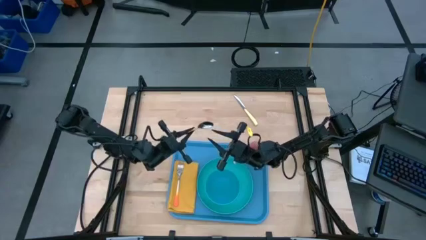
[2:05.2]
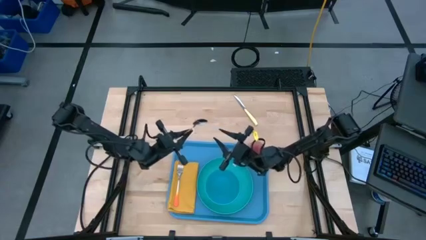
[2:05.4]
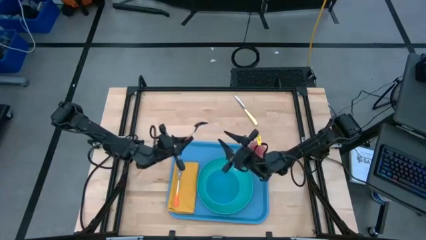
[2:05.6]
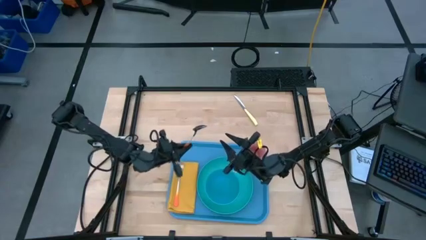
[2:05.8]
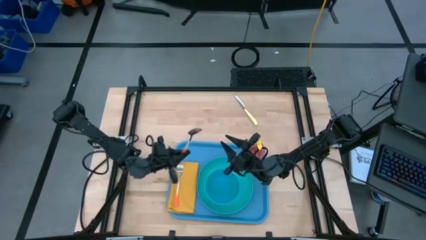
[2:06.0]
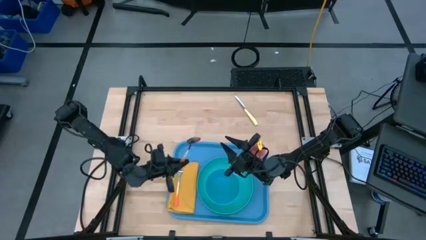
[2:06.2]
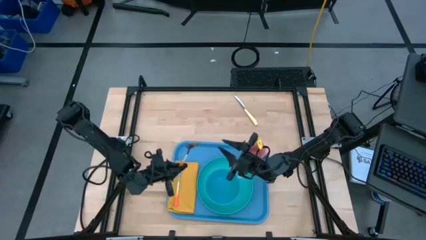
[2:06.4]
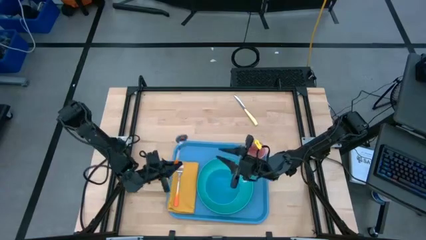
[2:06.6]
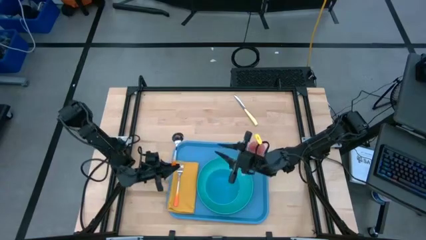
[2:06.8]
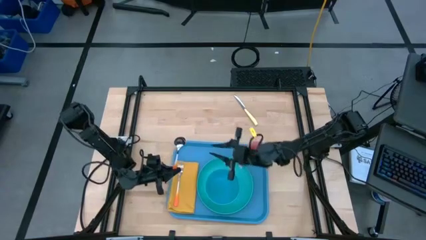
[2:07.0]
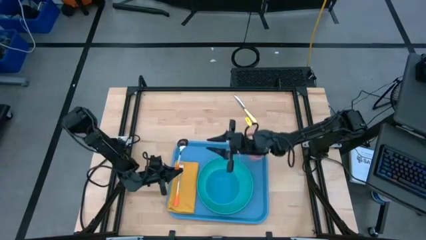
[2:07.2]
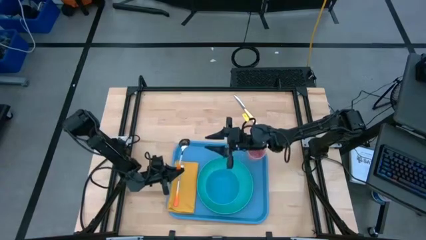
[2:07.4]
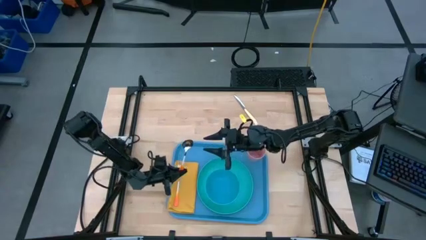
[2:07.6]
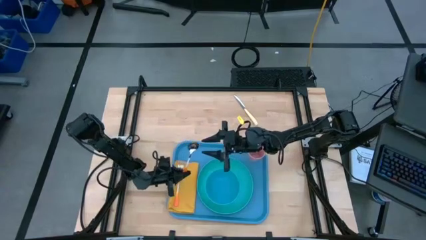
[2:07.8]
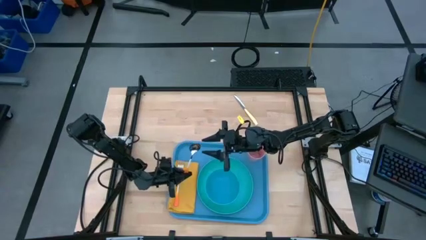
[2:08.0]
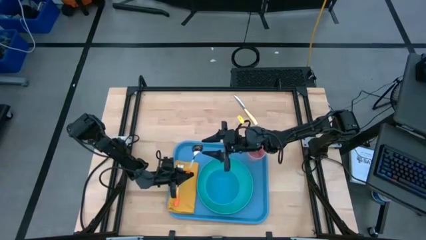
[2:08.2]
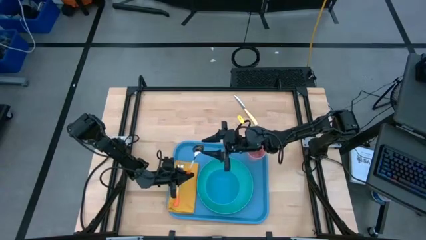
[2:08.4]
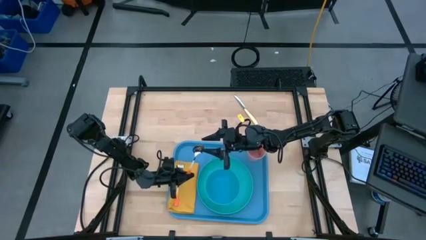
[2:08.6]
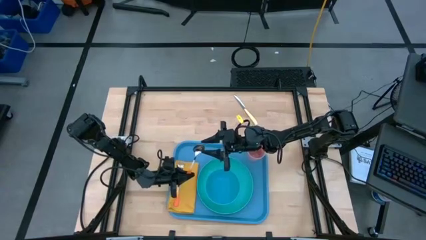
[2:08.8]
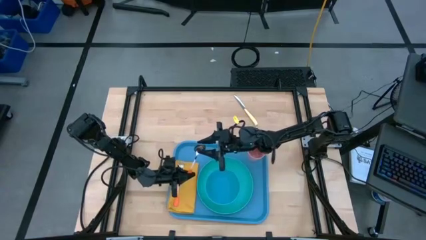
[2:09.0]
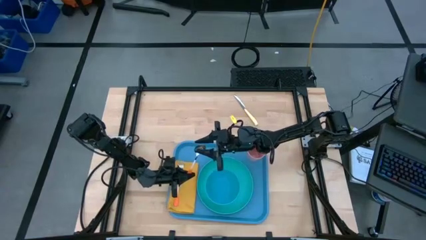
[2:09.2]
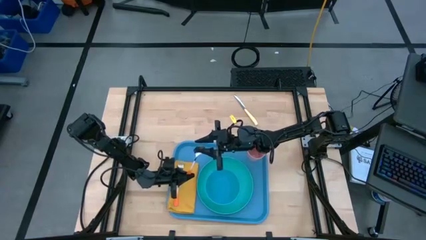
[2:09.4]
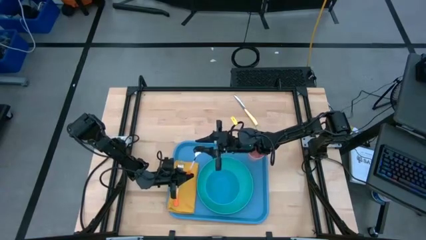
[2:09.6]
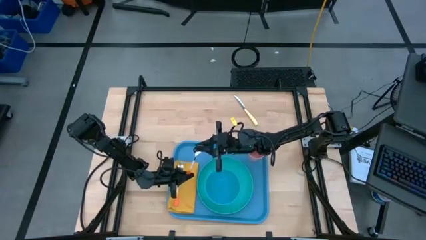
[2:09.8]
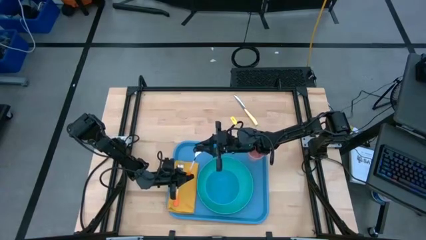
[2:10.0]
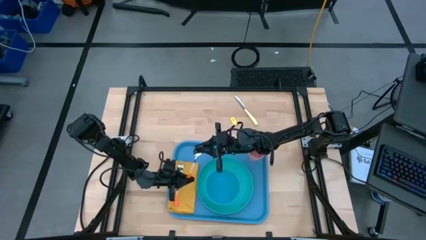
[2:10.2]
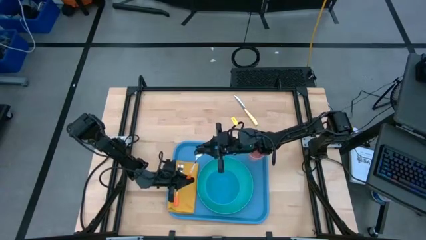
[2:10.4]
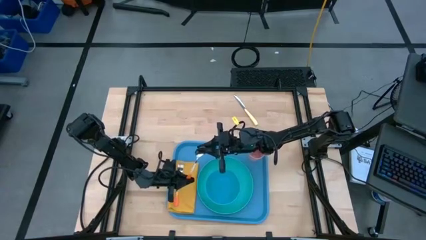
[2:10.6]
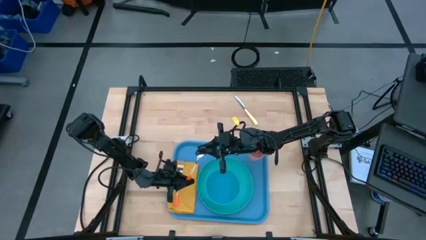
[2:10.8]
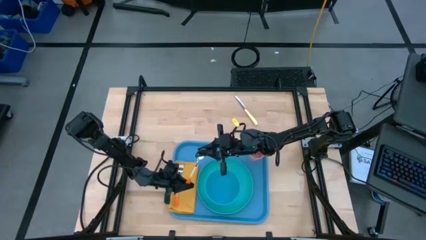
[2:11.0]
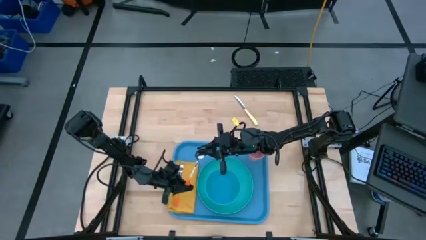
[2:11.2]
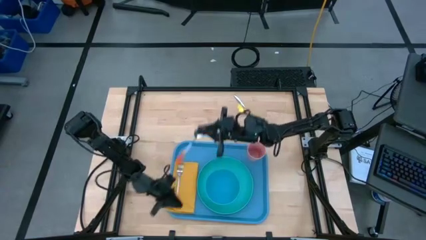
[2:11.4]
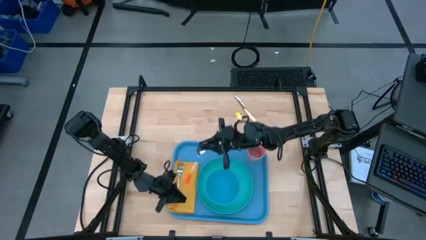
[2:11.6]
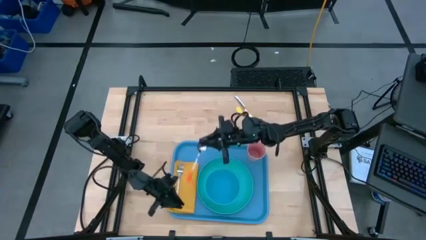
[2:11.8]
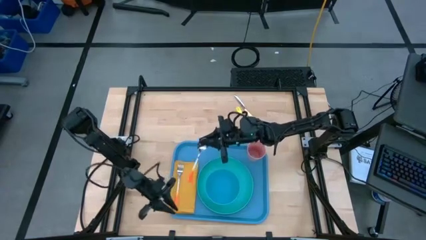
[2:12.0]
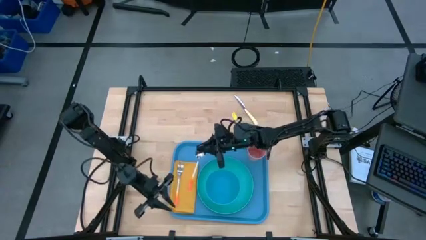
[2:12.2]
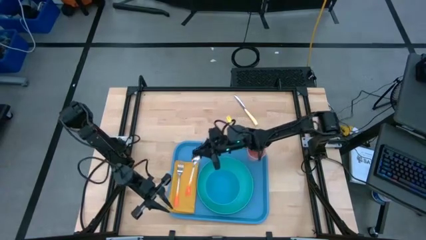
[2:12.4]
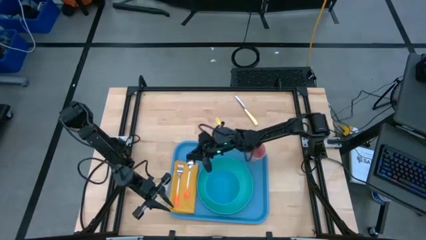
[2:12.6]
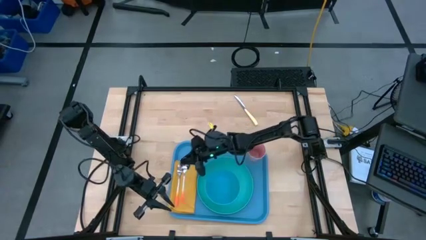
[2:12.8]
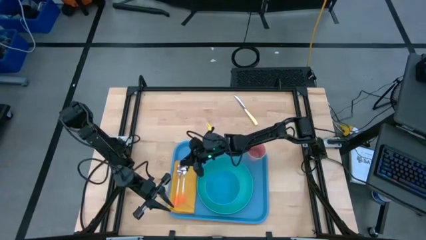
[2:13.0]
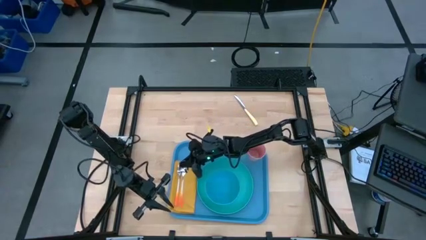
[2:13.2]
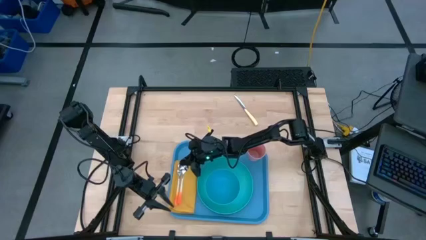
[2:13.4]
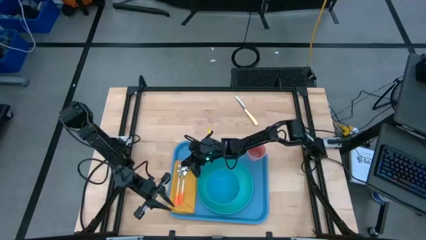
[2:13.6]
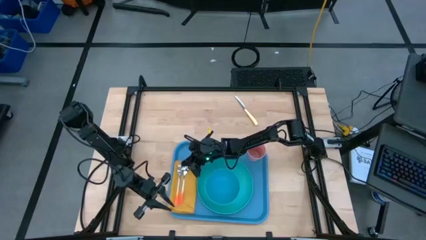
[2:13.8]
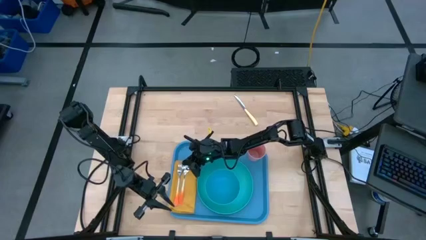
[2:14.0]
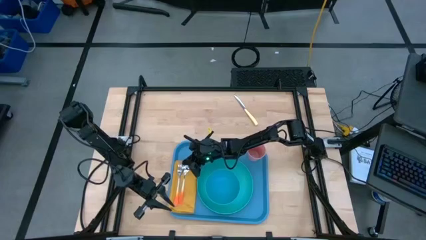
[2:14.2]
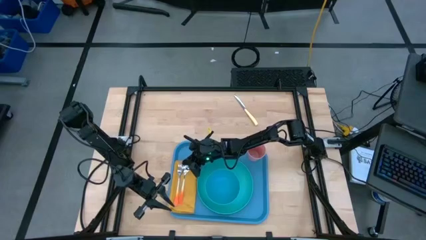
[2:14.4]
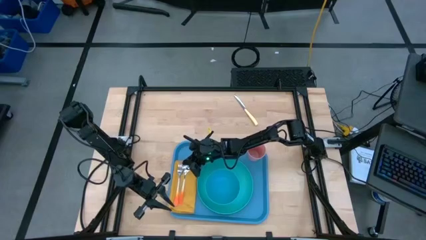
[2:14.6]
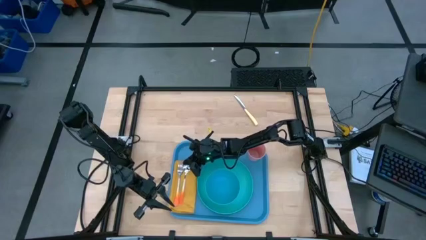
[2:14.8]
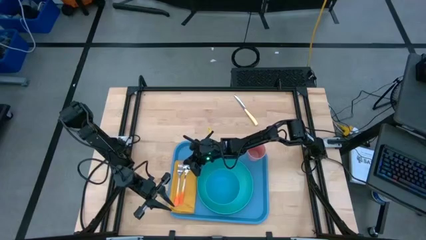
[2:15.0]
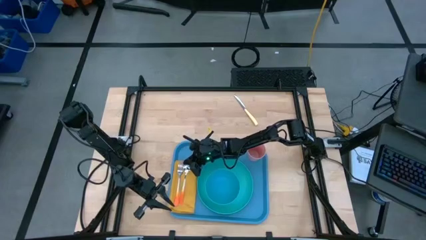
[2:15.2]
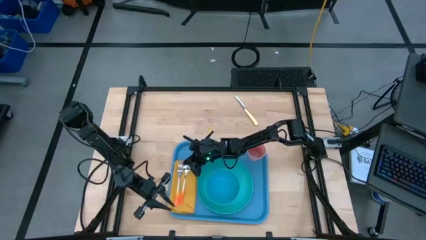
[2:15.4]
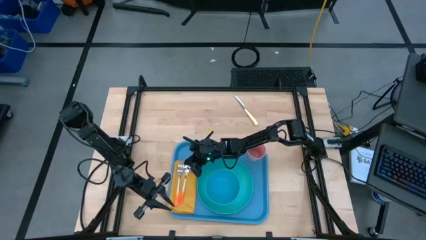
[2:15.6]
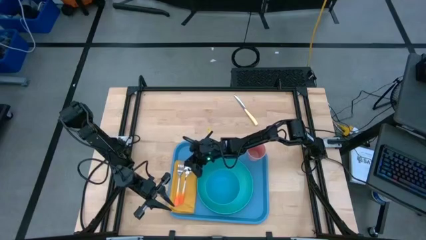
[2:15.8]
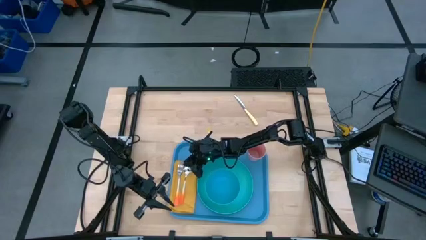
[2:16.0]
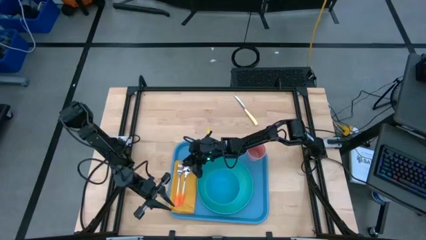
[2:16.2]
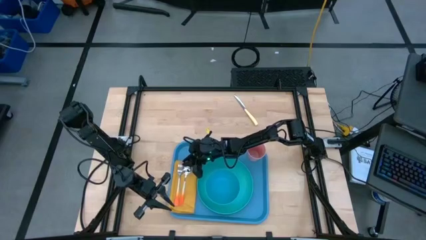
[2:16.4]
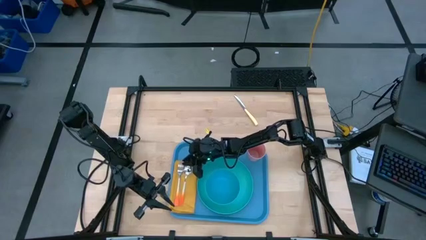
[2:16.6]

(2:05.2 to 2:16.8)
Task: Set up tray
Put the orange spoon on the blue tray to the right of the orange fork
